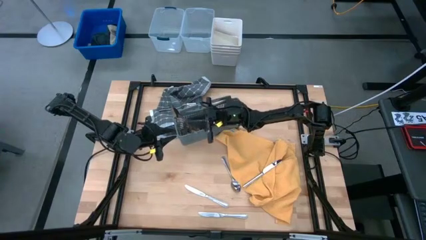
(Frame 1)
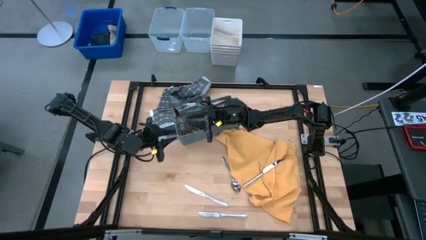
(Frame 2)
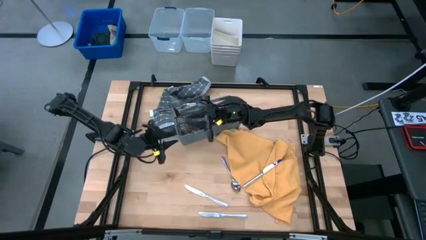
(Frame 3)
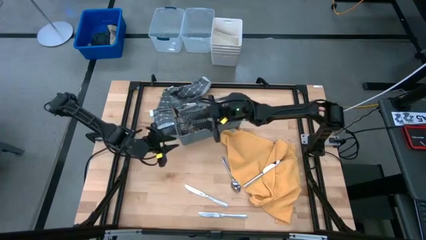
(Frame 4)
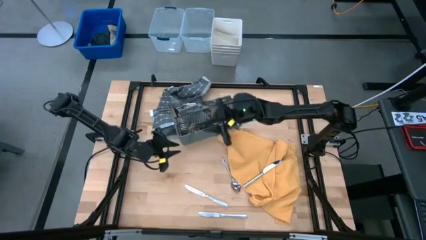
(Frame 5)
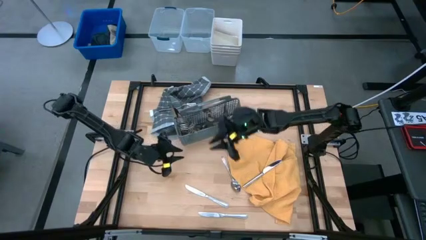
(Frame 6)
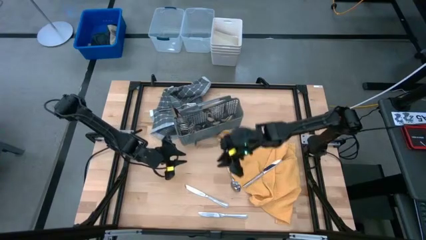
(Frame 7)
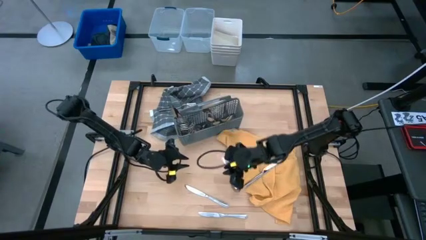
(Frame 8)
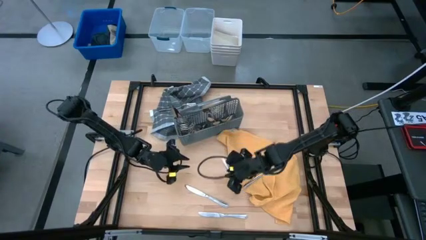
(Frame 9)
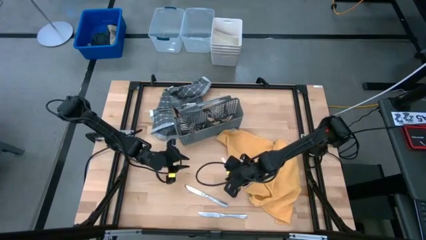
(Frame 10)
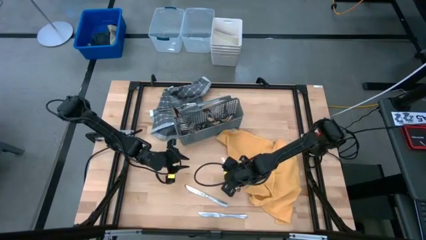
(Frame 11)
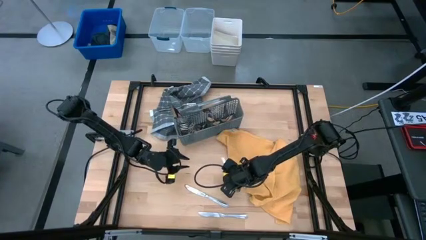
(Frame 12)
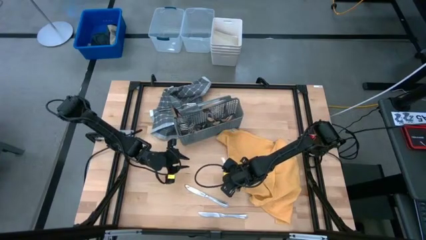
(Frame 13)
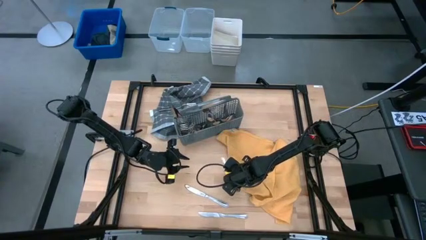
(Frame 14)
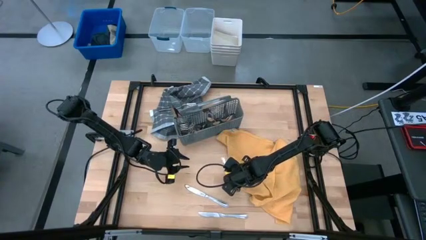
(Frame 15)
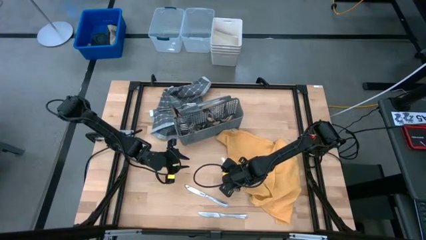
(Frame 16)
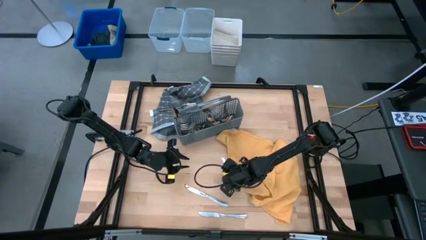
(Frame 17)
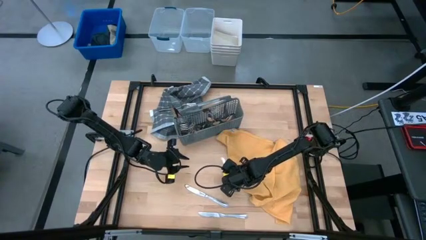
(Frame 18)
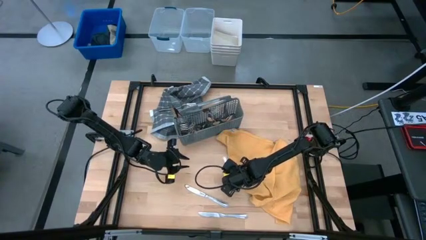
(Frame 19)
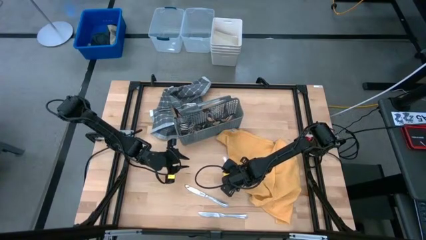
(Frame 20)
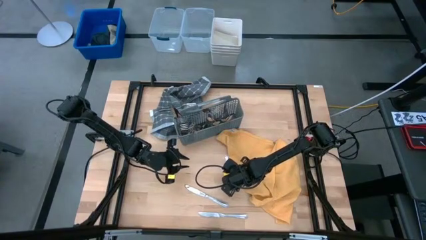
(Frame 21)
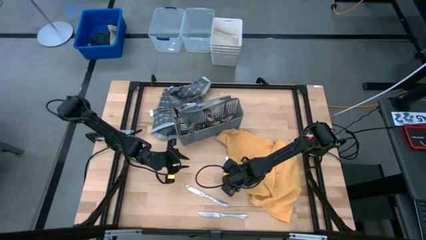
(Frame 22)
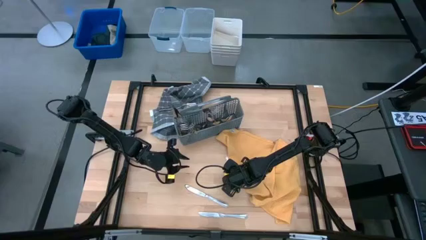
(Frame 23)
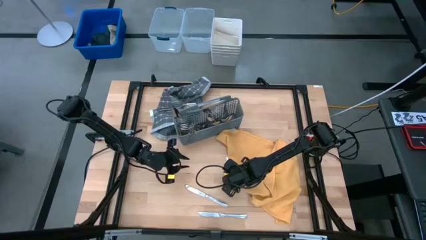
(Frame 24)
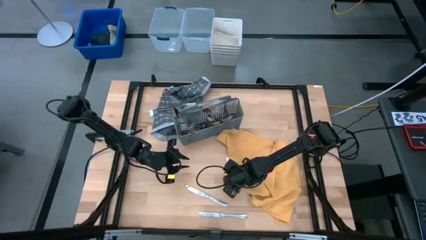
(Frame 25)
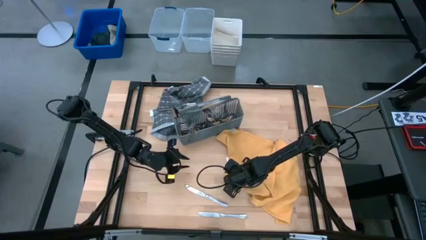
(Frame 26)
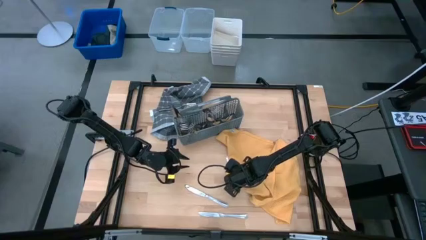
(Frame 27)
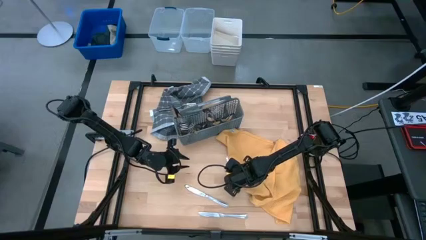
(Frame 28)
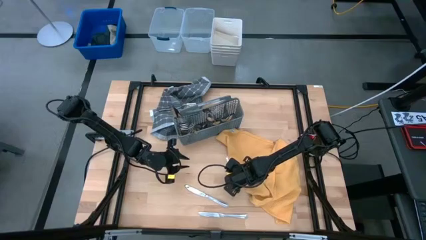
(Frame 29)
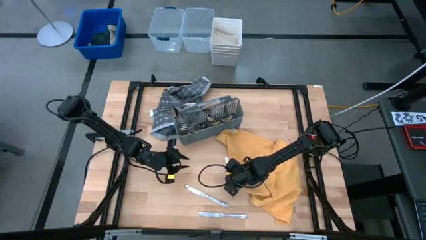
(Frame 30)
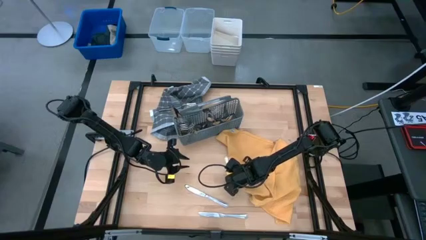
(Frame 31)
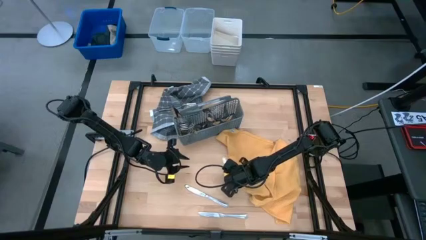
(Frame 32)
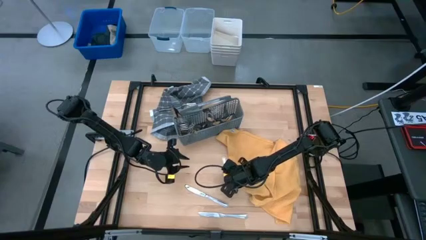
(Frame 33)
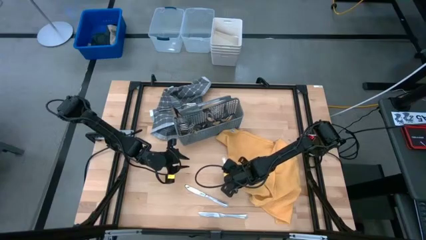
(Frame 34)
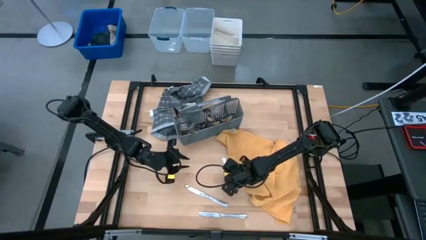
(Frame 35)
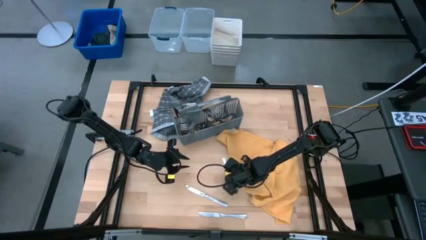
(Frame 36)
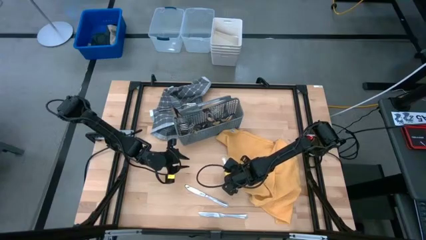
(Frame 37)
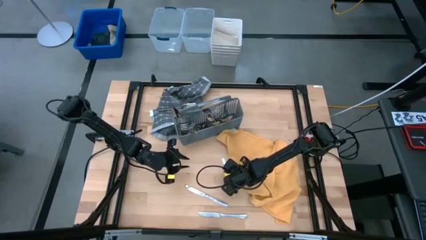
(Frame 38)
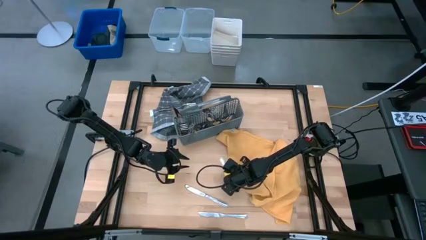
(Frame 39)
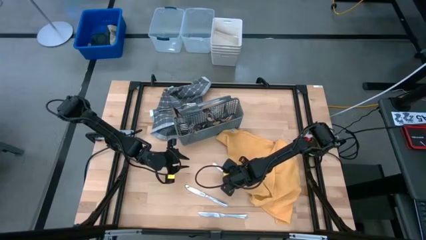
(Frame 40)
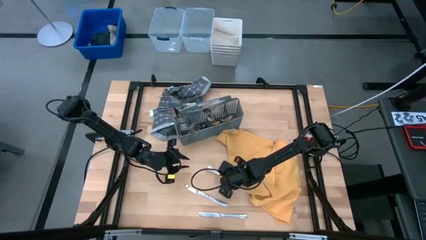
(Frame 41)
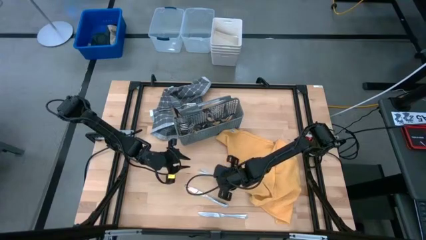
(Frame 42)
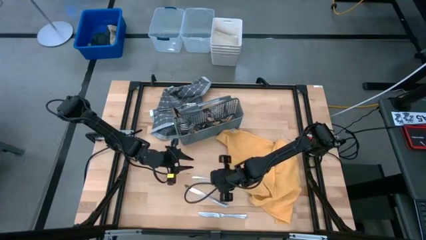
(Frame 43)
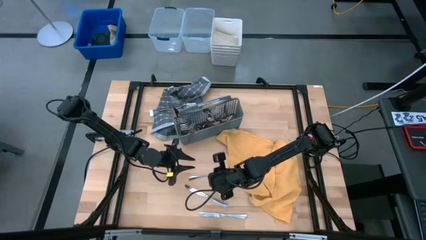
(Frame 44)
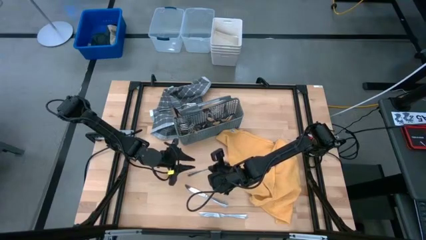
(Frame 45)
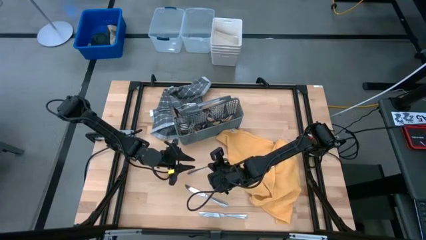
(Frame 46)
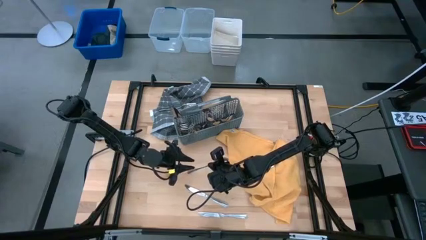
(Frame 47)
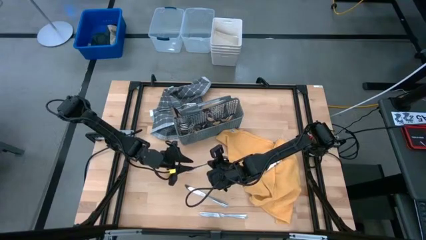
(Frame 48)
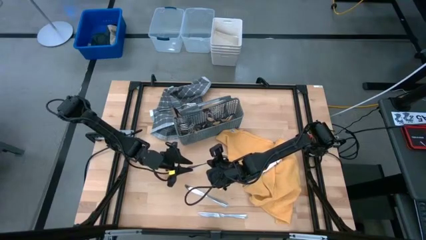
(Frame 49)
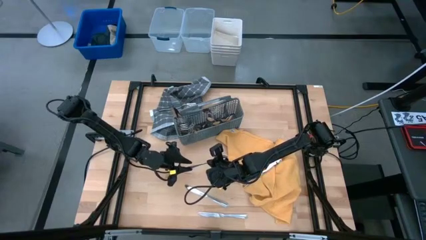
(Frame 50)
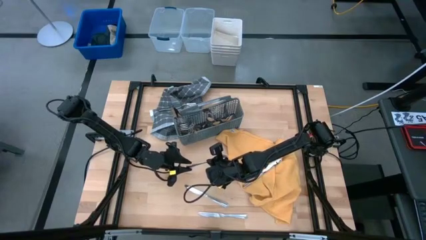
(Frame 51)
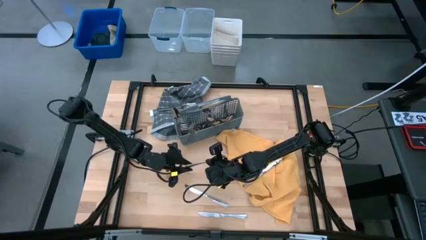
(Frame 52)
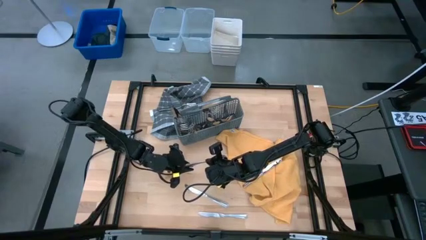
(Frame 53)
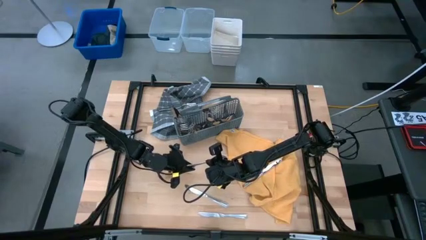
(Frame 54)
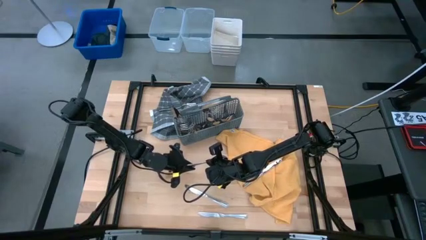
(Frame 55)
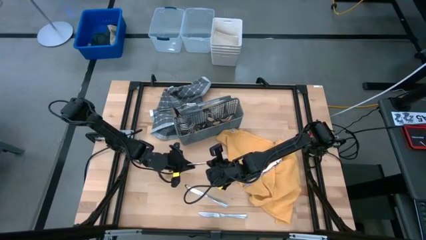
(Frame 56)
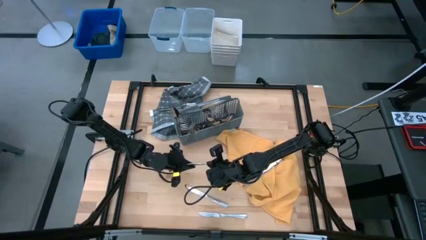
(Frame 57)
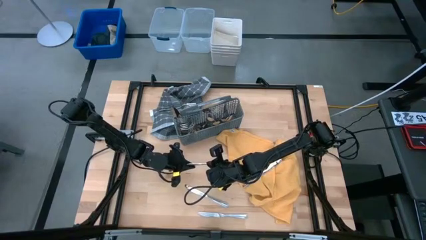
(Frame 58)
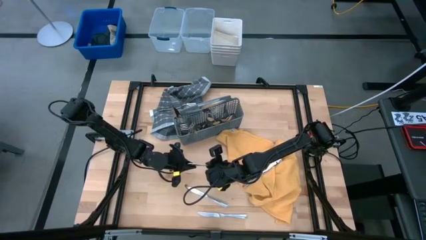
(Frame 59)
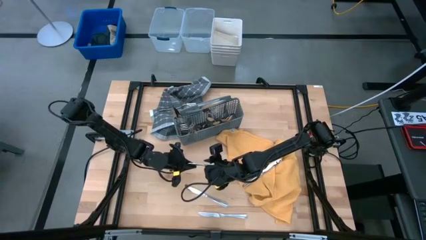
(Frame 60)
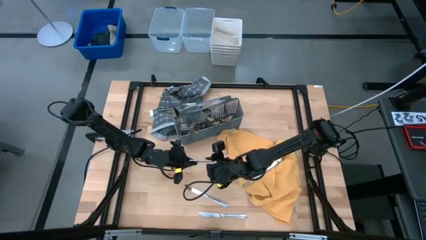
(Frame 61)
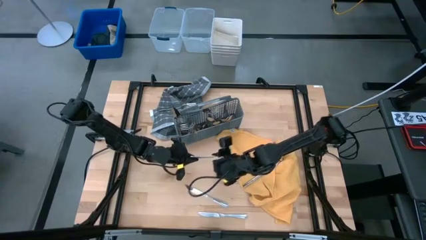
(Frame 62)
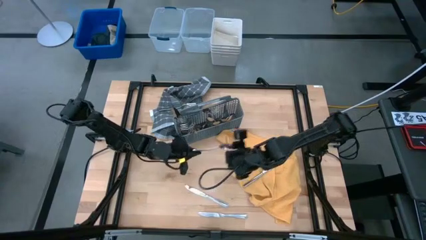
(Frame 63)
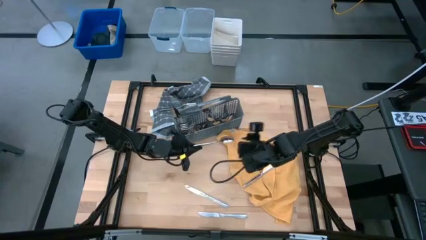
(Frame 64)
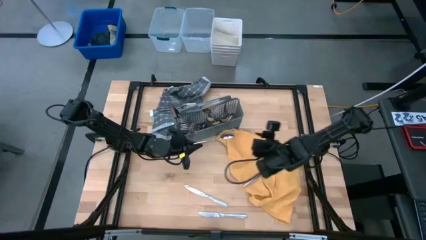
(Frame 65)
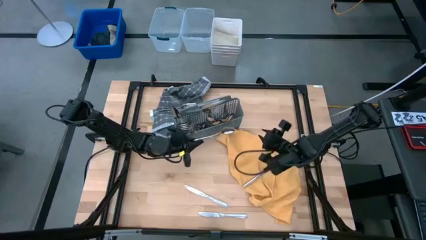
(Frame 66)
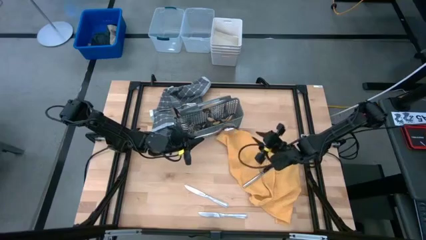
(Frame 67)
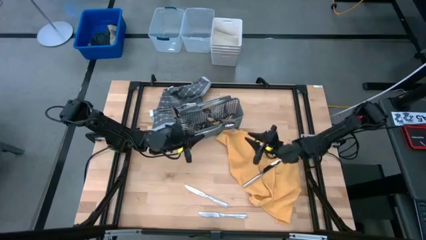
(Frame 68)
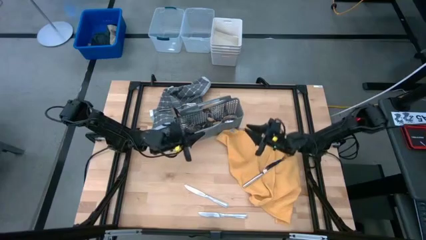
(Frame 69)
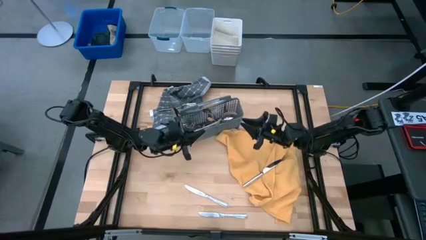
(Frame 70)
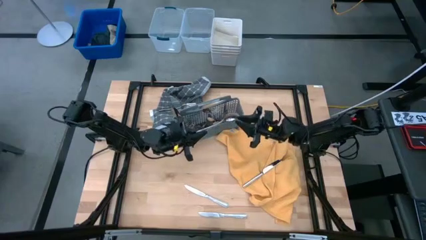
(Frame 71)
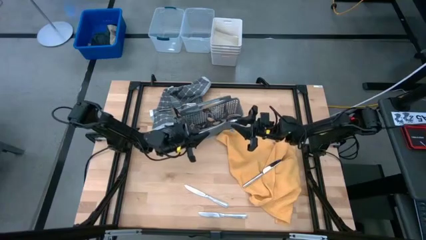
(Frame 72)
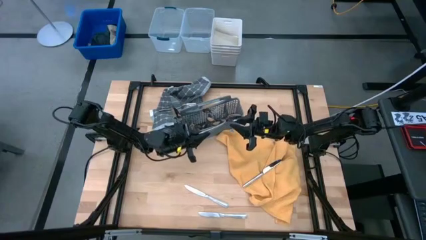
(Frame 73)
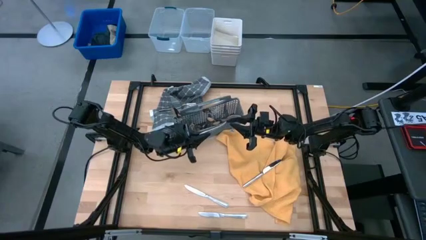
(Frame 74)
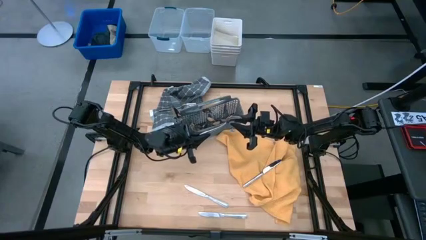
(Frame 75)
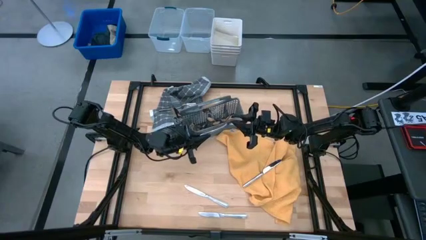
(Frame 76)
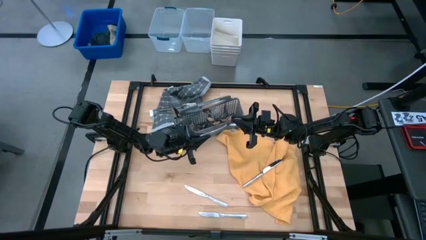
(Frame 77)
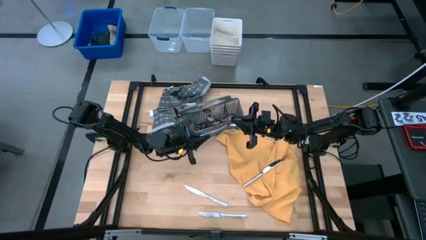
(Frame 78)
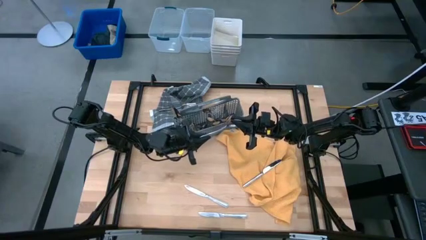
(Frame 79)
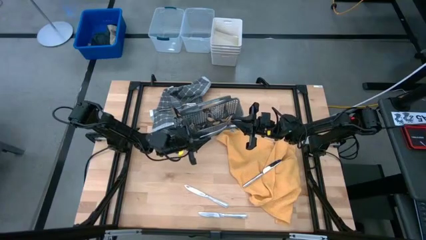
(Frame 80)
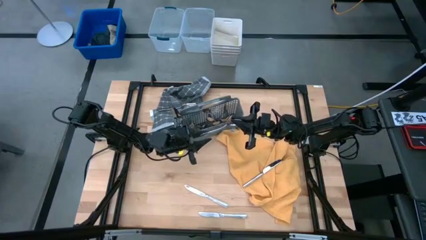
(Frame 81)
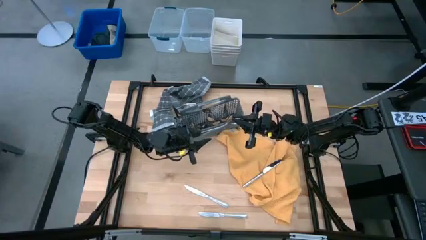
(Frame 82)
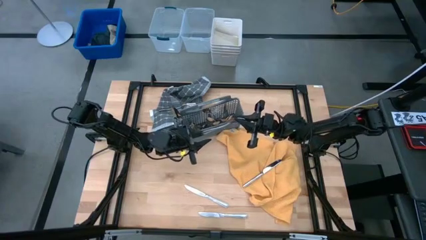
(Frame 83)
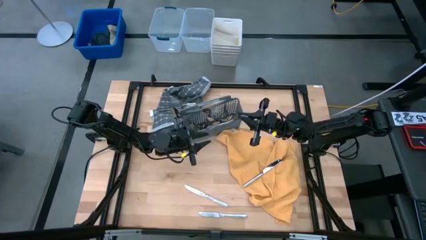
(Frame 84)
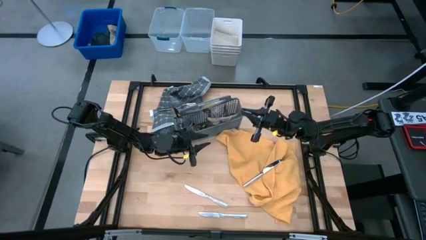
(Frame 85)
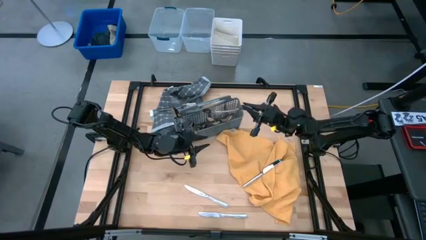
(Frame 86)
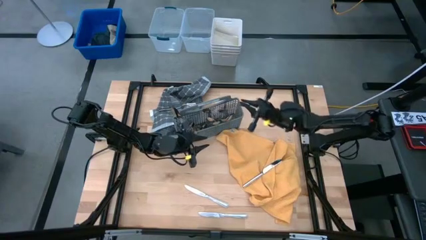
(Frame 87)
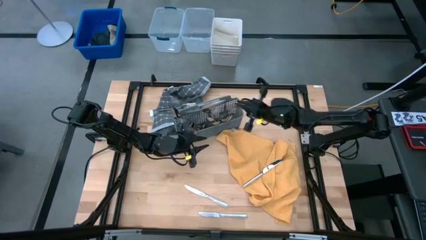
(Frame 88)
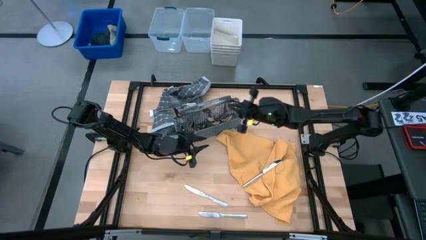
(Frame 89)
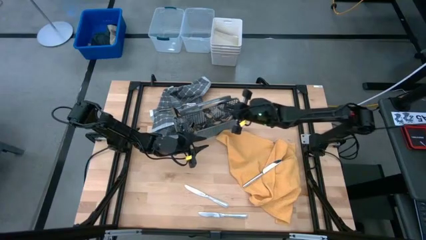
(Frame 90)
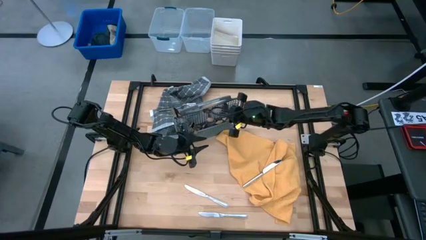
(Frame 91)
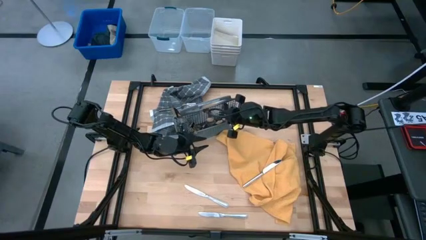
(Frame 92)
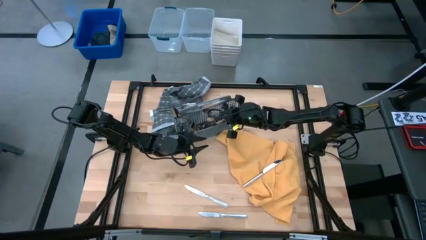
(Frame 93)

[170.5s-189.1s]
Task: Sort silverware
Put the silver spoon into the gray silverware basket
